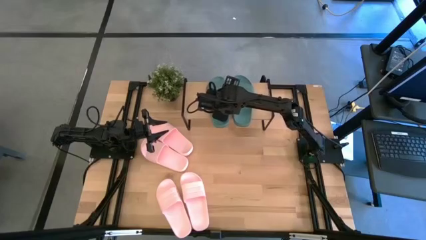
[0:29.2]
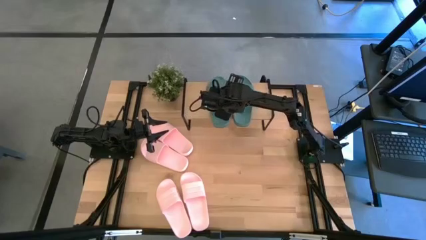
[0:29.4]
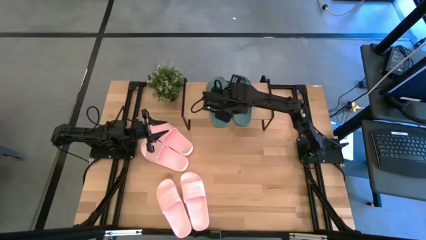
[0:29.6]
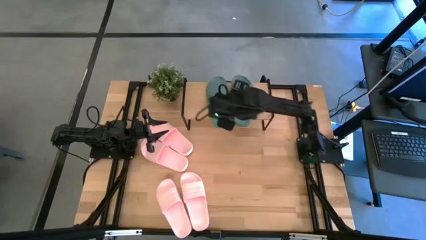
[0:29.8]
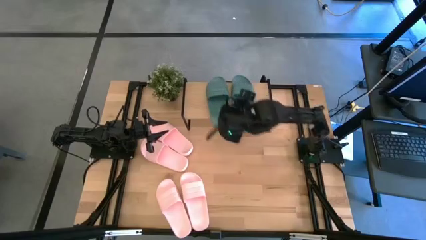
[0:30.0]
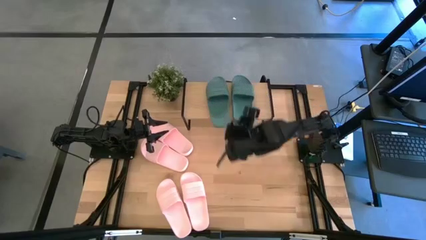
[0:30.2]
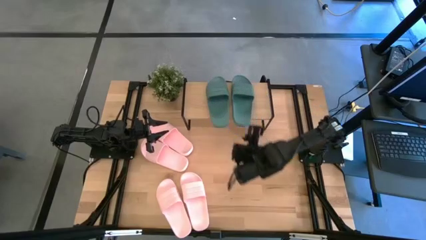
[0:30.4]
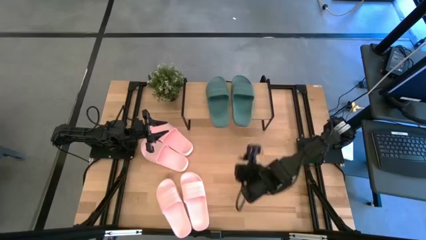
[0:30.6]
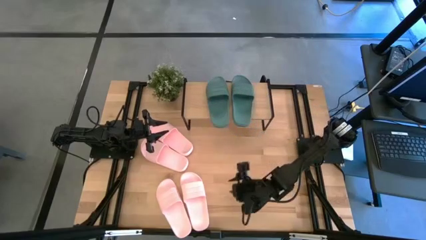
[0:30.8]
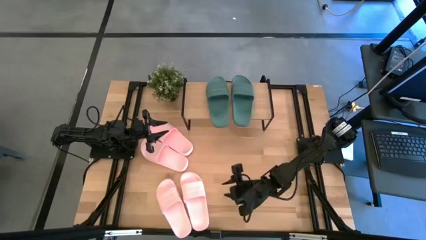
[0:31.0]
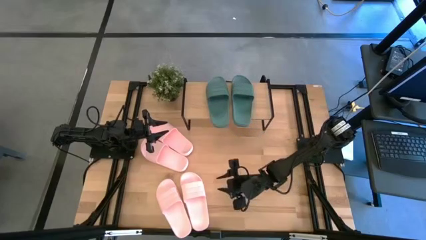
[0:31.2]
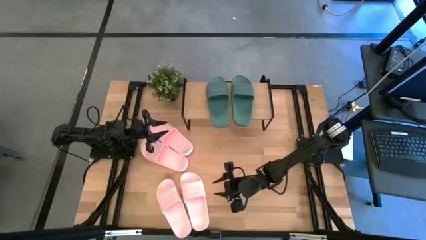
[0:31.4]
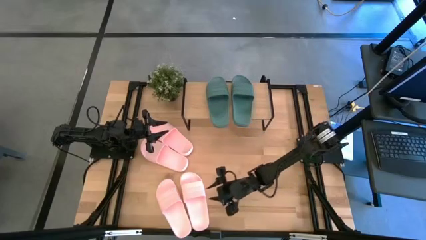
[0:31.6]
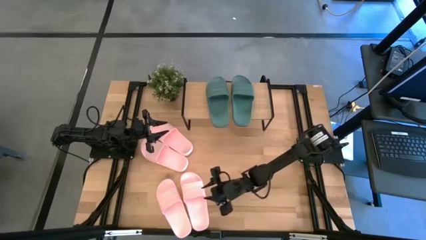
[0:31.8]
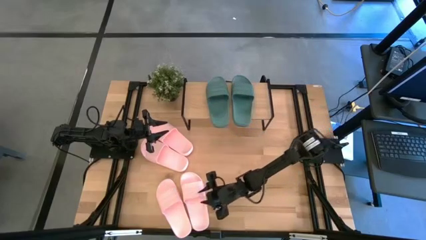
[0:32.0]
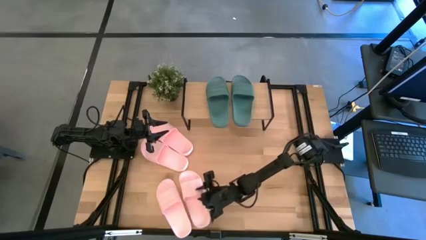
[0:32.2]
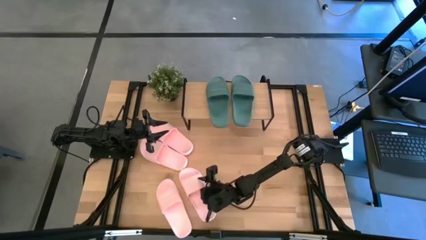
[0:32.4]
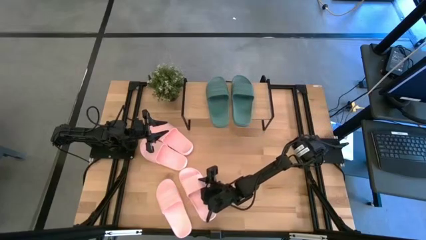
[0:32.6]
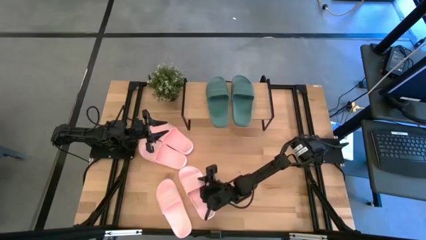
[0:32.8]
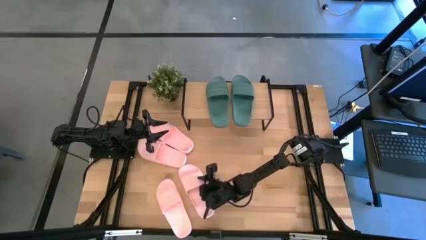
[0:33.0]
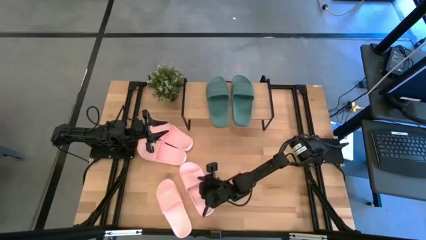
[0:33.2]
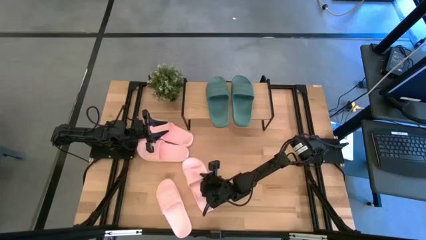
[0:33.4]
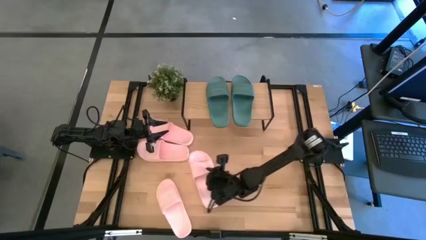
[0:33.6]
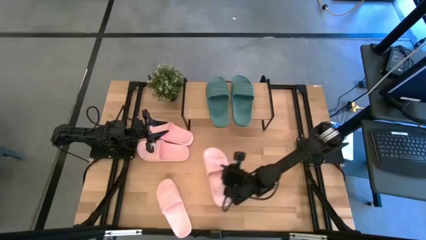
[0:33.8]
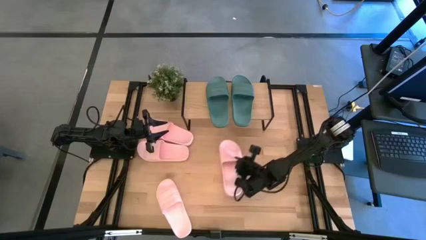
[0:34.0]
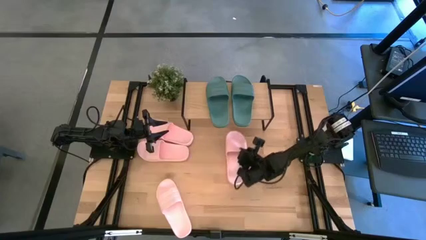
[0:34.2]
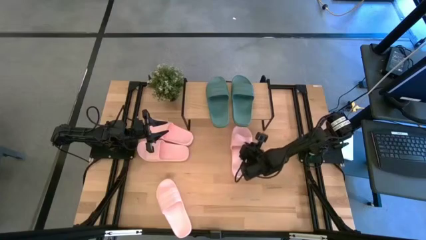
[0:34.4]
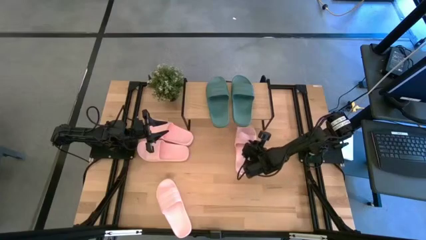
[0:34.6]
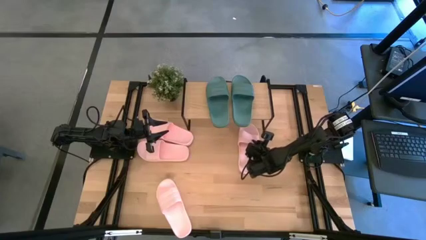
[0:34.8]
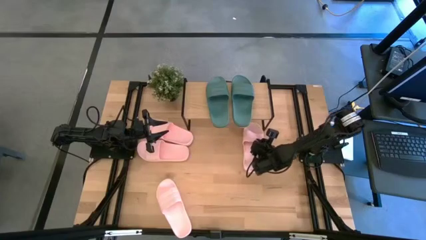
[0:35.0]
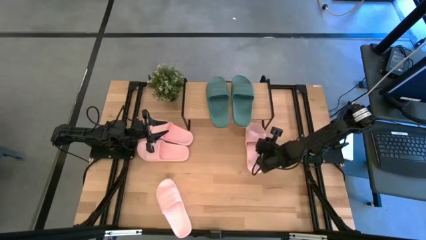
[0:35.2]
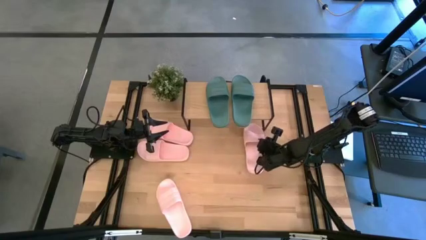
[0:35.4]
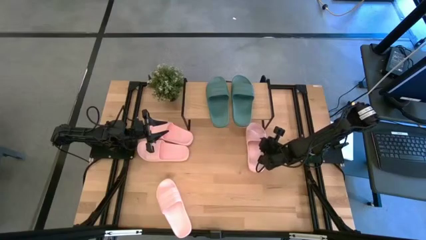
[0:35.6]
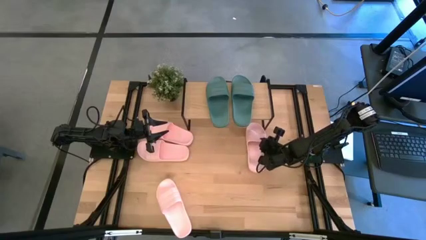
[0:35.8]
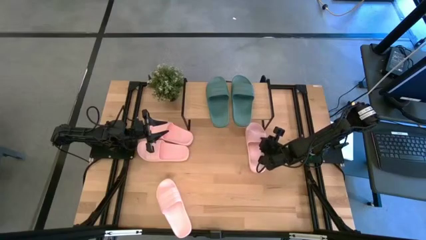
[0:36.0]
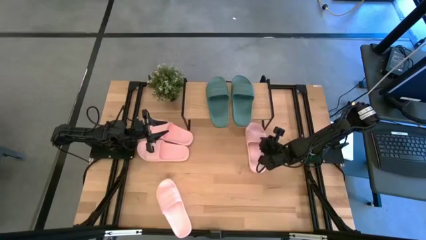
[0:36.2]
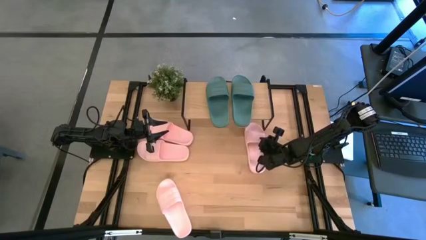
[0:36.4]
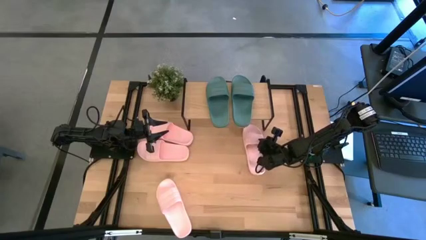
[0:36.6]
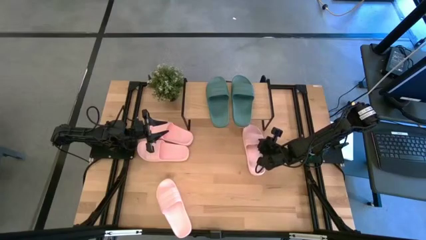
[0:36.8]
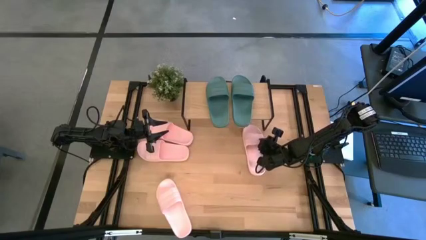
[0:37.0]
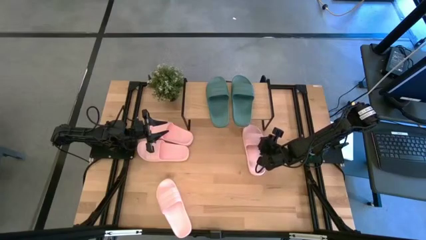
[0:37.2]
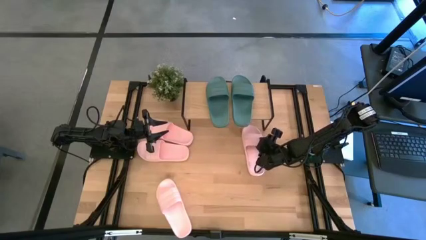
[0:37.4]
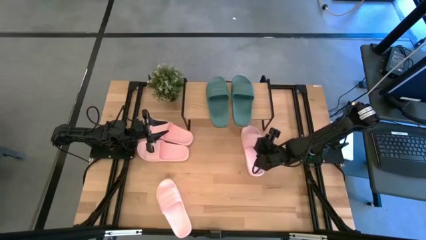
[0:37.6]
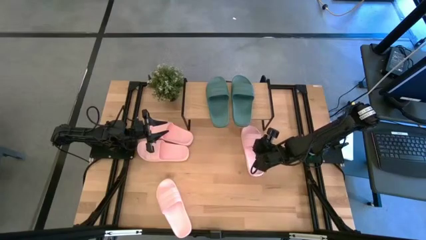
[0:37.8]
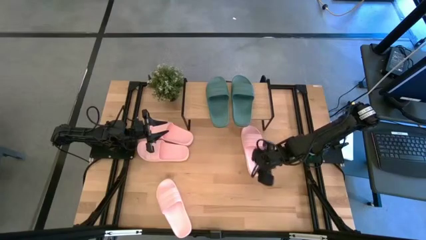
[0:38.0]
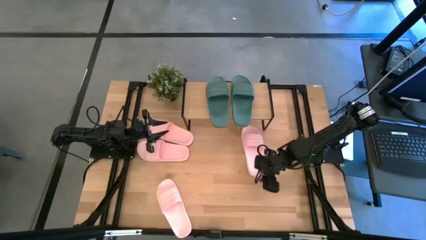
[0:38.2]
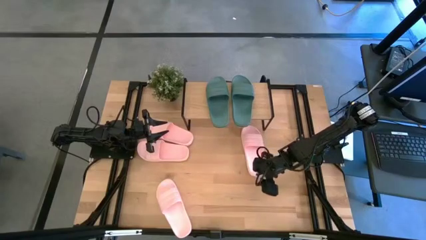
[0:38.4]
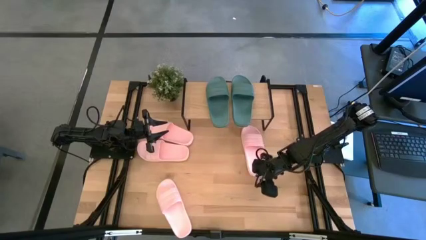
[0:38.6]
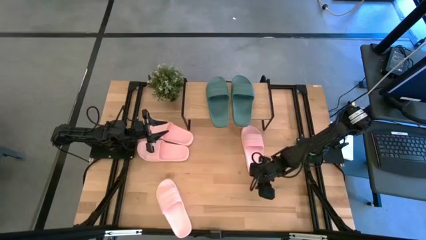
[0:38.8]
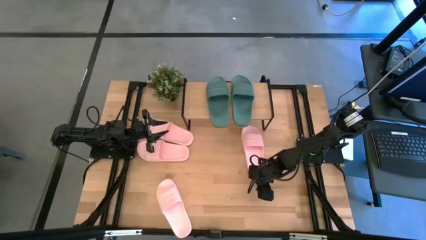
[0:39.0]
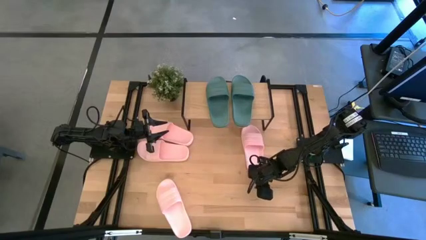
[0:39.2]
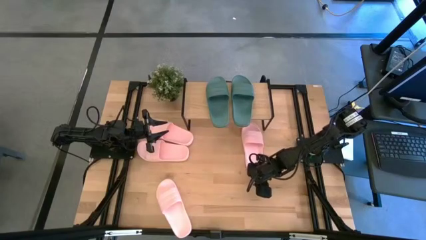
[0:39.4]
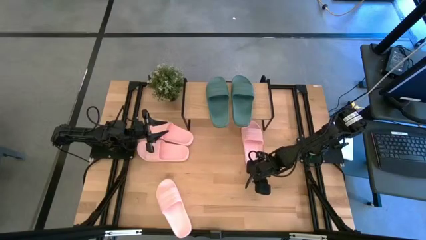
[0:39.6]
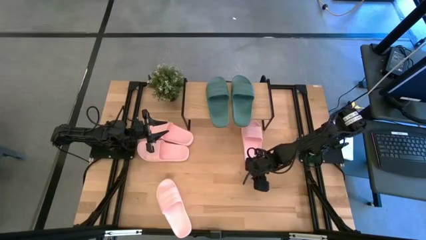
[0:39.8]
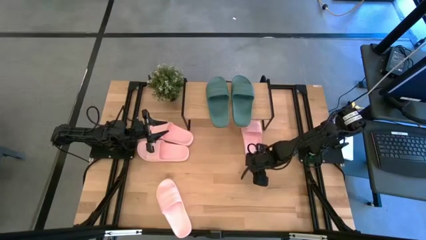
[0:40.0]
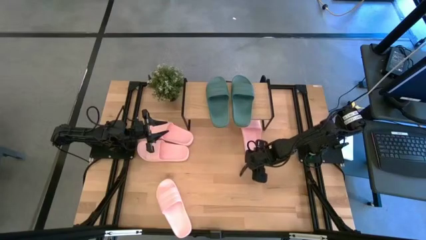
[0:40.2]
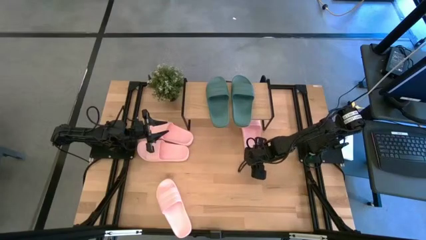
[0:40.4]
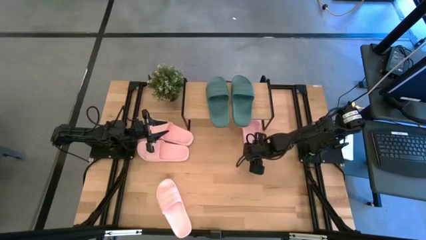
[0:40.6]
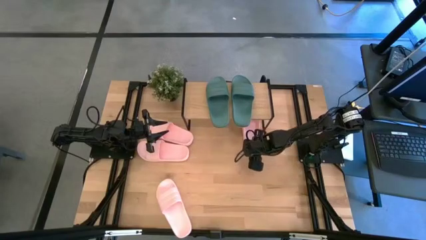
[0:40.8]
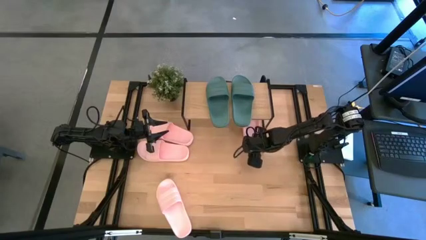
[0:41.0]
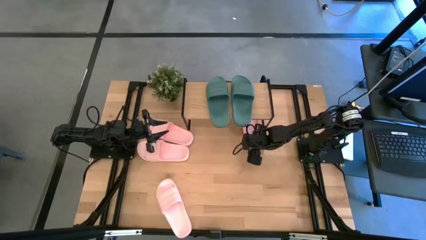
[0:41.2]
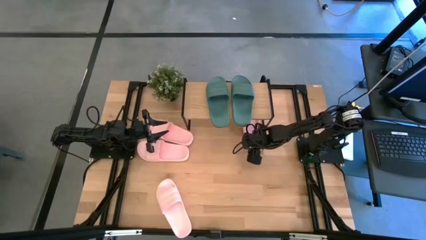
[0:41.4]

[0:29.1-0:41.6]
Task: Pick and place slides into the shelf
Put the pink slipper under the shelf
